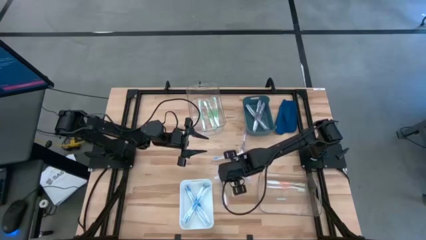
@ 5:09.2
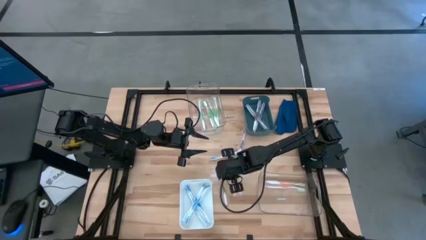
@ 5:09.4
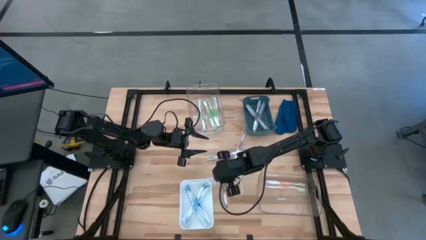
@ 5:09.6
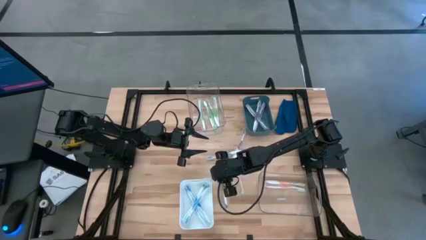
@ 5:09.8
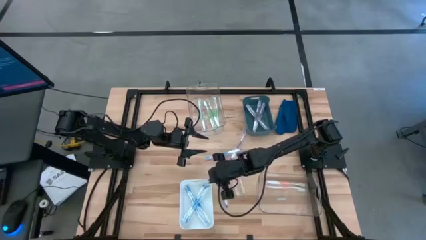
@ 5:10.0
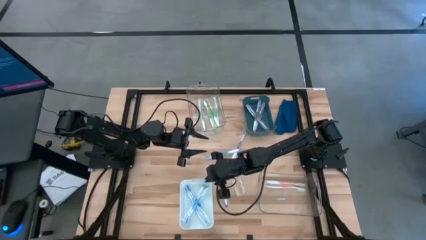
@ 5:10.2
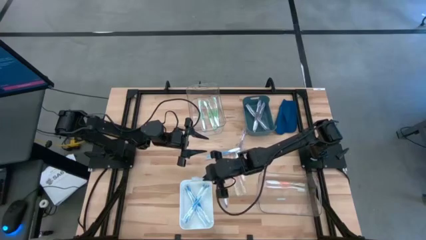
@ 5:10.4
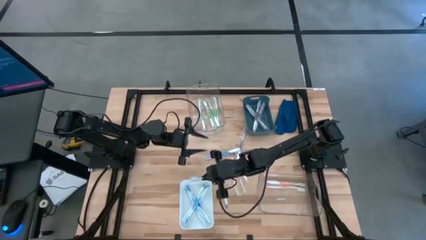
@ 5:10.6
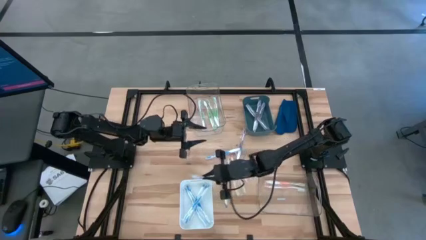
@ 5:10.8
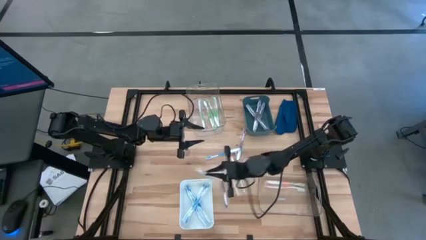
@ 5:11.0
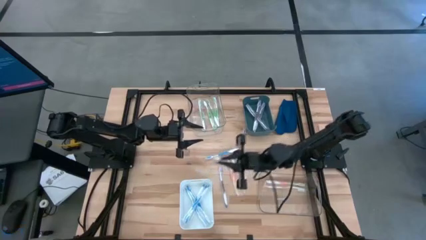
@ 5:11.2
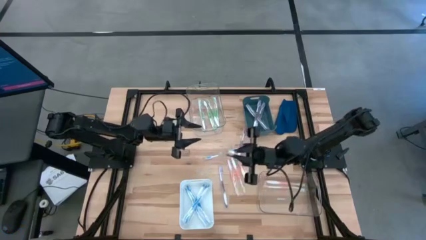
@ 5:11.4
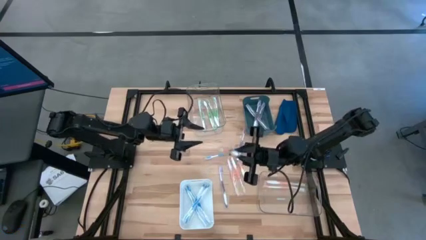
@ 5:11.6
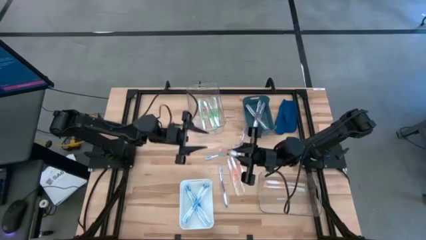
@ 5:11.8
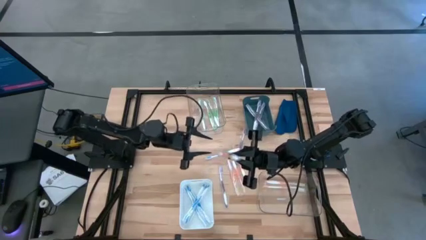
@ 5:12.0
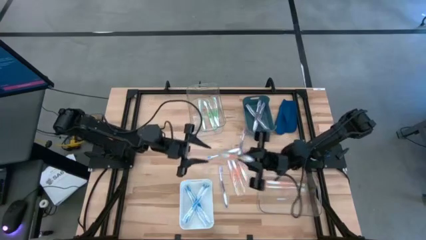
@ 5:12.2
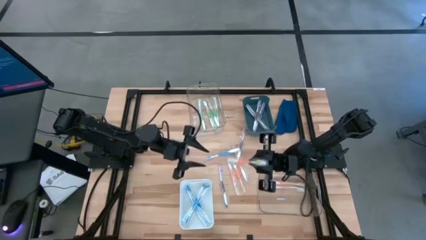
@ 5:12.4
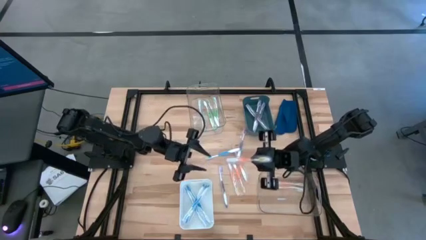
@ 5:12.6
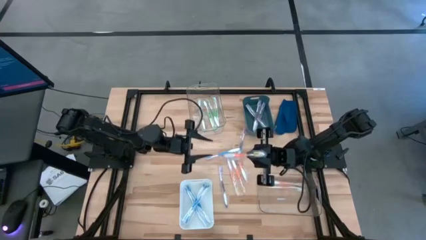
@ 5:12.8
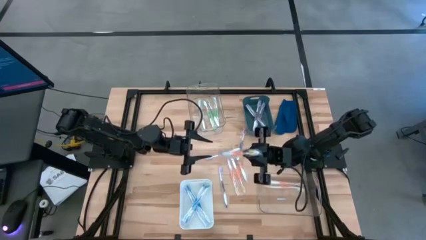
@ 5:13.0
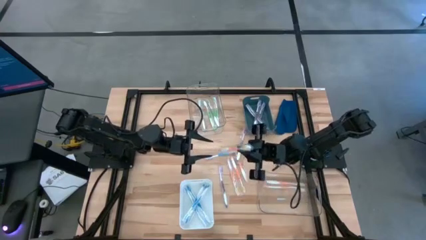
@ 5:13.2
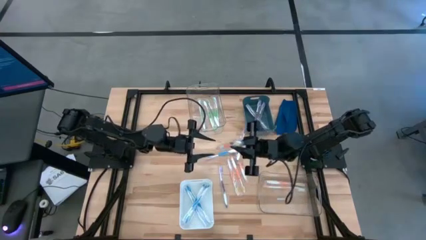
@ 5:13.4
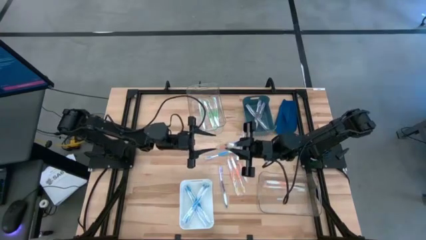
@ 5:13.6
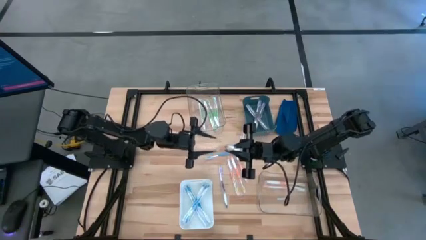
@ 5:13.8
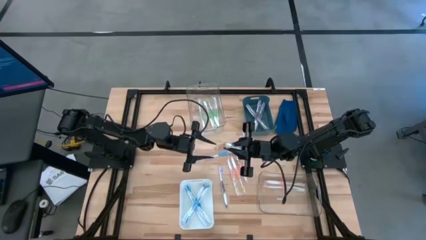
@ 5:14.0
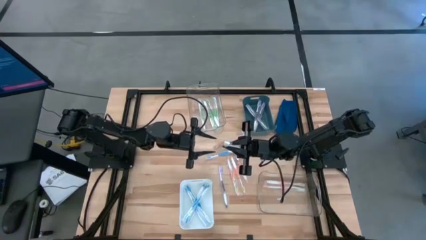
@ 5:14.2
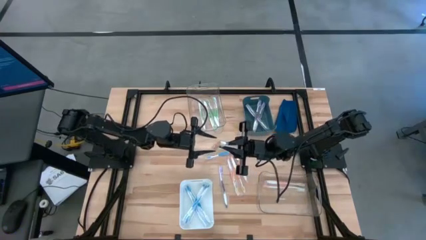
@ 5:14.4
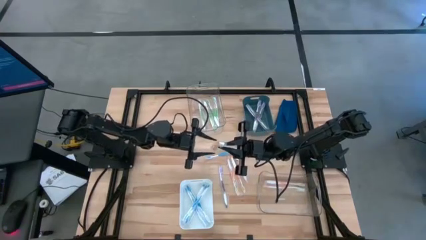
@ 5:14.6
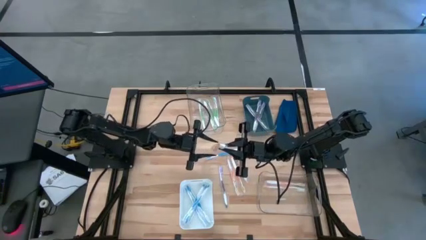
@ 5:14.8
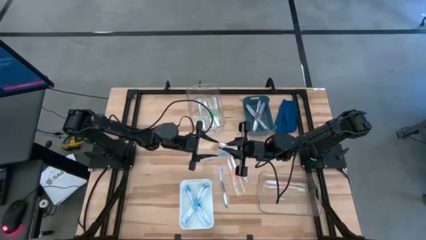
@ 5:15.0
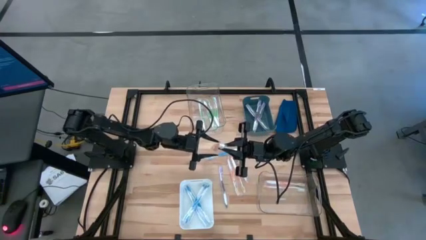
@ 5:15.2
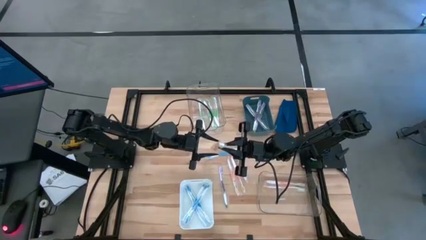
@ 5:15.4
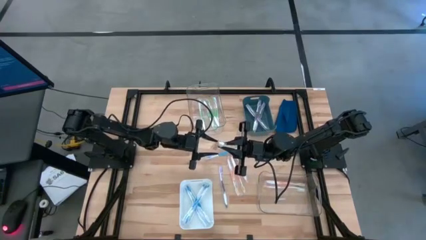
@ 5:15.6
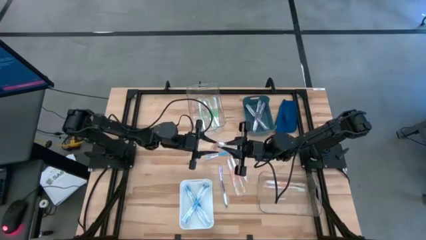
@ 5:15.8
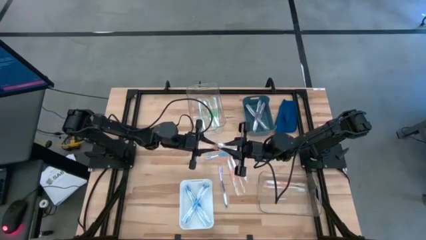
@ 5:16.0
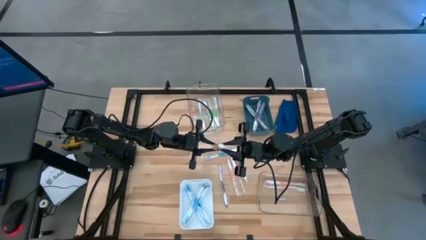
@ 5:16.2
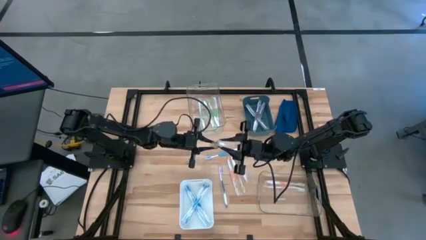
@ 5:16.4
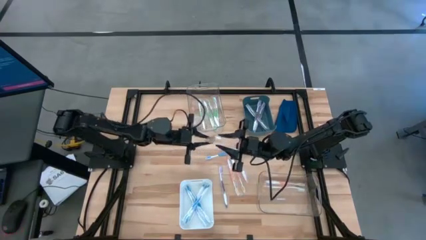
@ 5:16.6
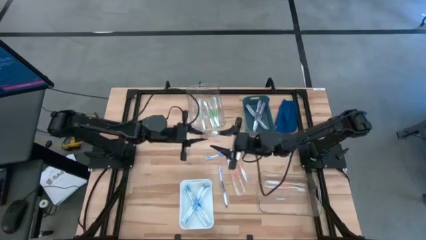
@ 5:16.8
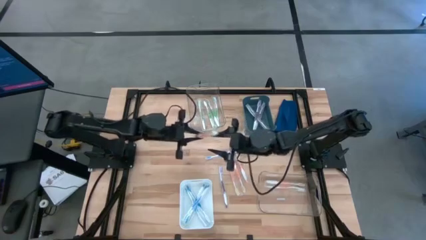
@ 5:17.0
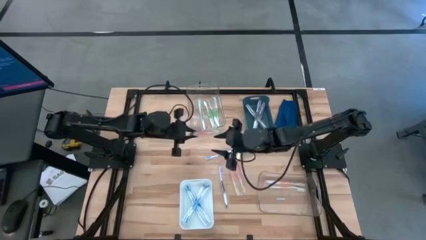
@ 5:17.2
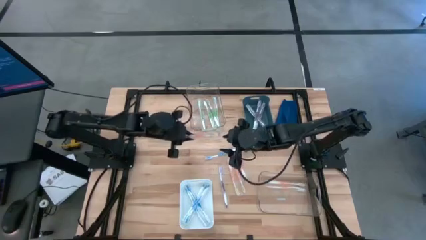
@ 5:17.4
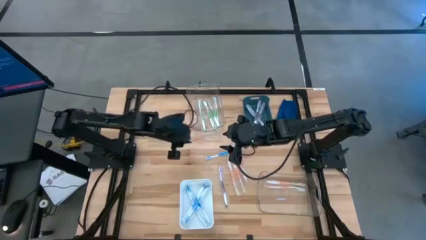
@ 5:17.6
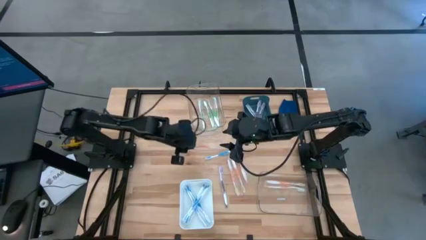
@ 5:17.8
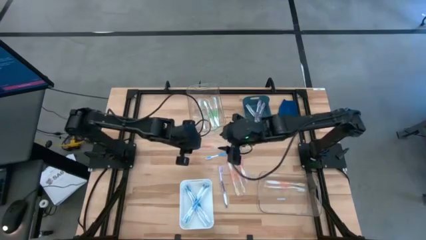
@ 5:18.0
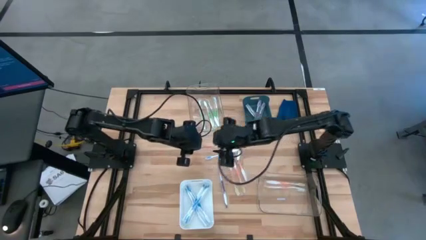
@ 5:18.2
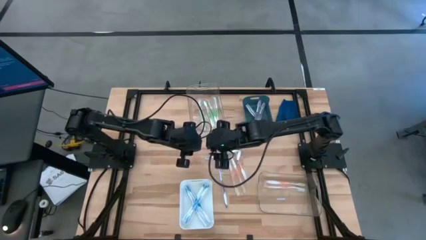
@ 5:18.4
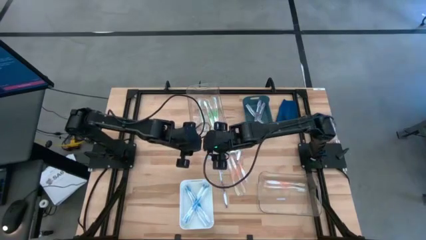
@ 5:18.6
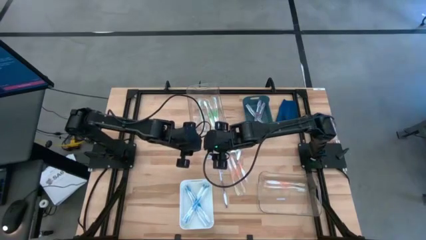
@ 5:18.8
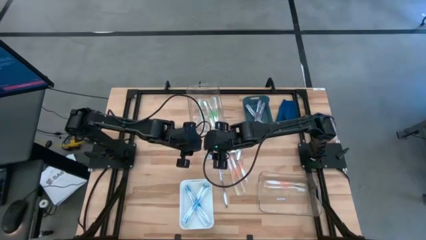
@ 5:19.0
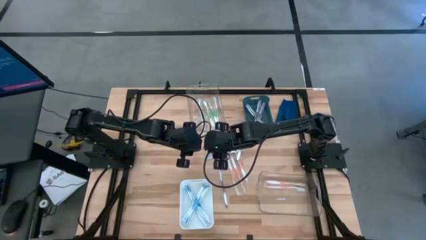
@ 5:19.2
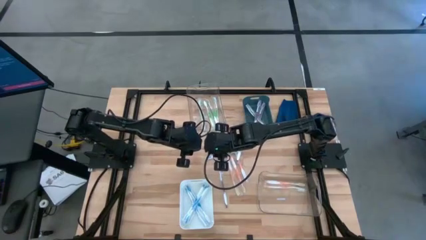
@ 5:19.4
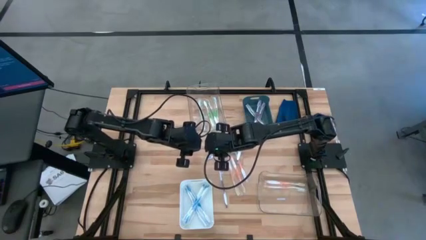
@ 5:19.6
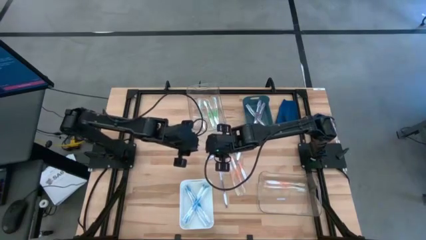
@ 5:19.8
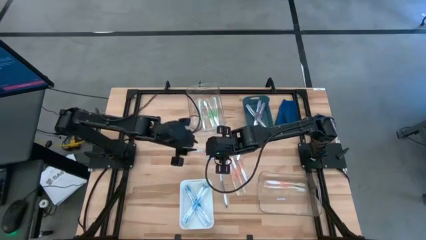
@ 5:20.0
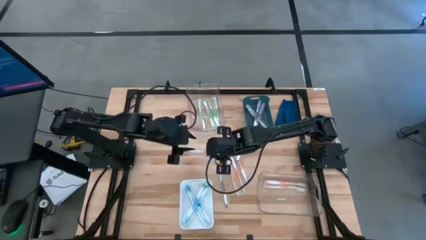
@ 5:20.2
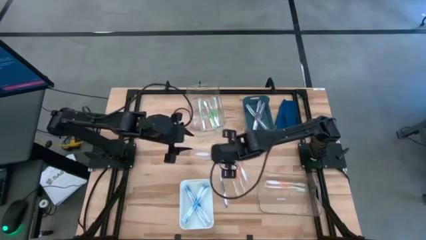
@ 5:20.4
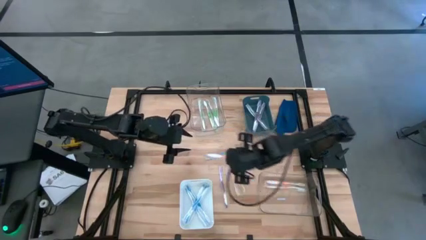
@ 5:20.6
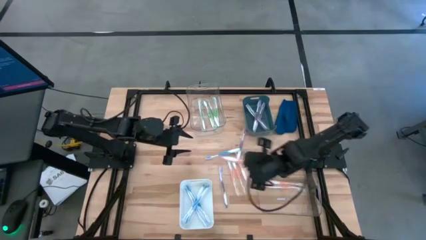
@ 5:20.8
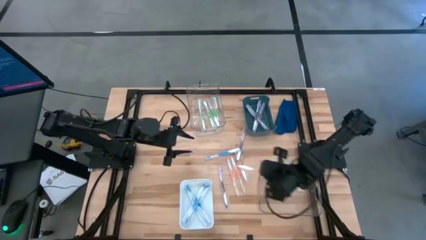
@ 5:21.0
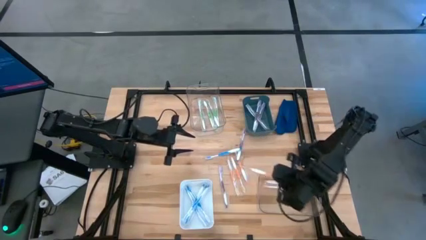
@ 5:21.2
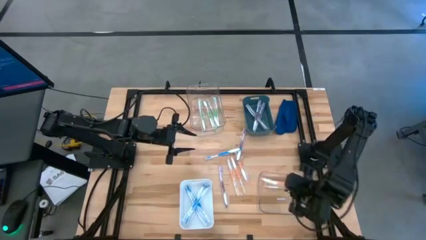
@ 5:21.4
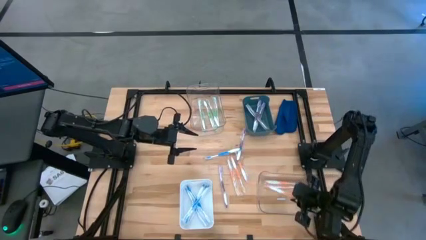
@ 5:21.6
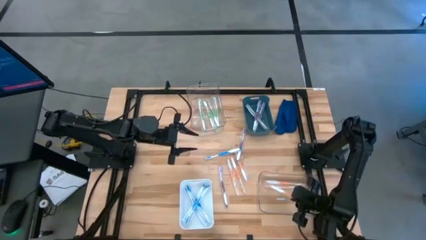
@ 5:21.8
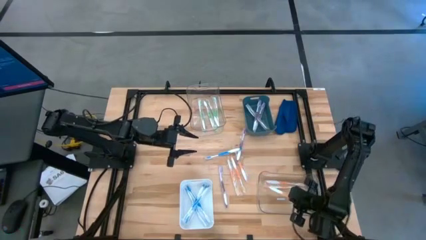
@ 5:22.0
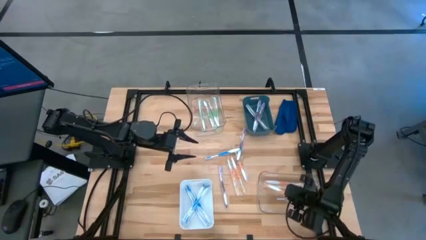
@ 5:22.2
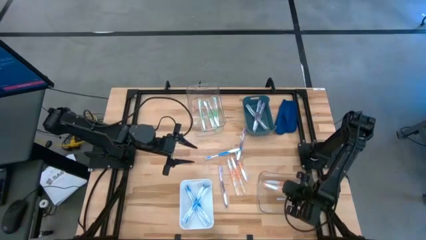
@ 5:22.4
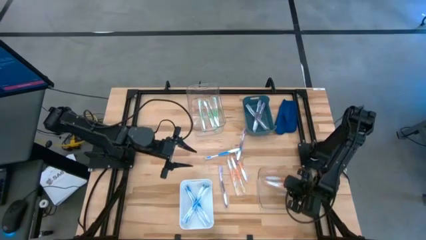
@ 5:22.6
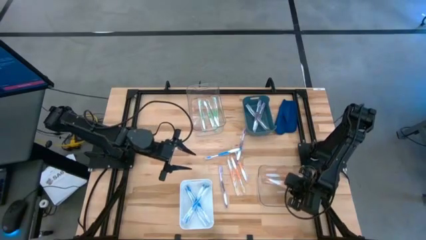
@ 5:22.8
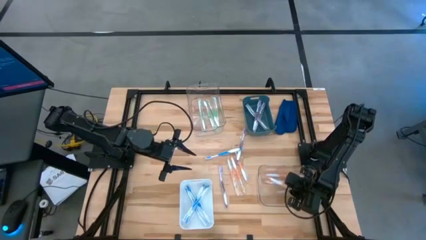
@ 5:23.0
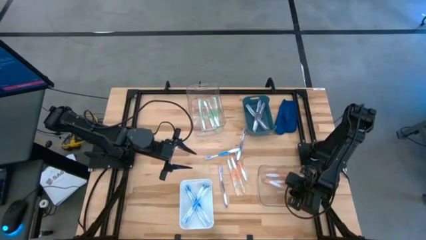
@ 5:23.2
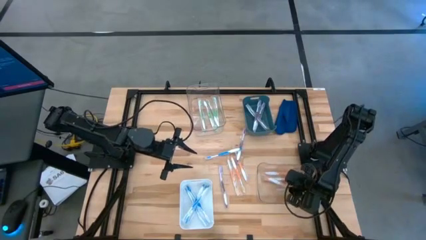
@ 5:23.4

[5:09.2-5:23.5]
Task: Pick & Place Toothbrushes
Put the orange toothbrush into the bottom transparent bin
